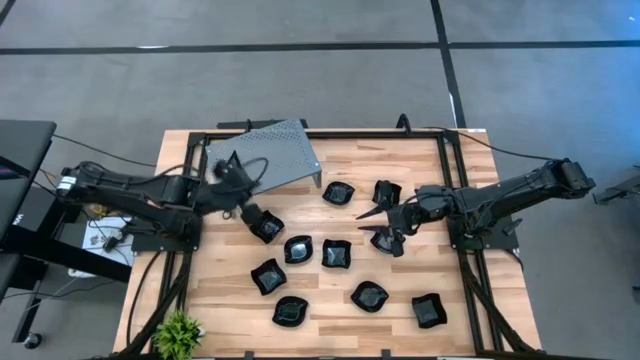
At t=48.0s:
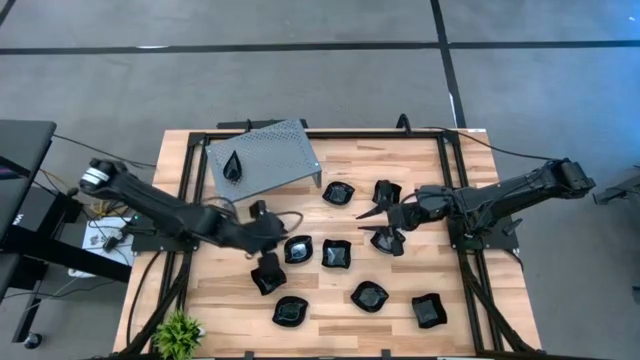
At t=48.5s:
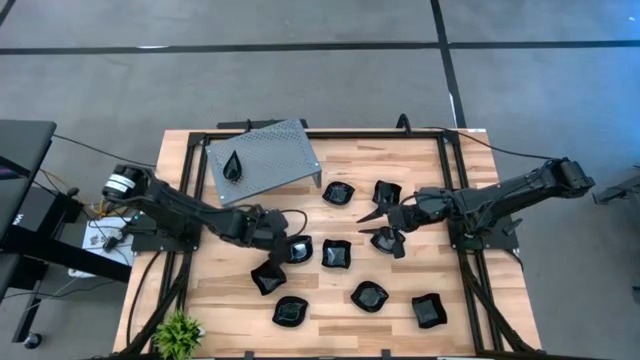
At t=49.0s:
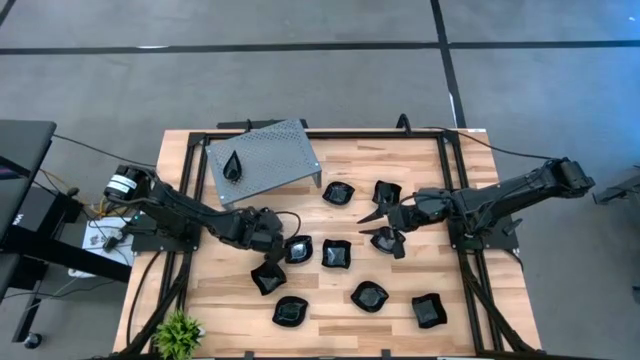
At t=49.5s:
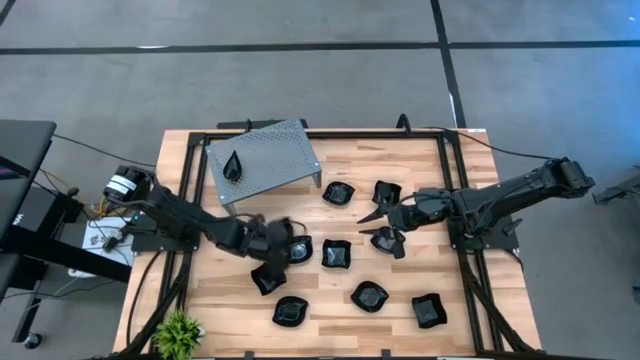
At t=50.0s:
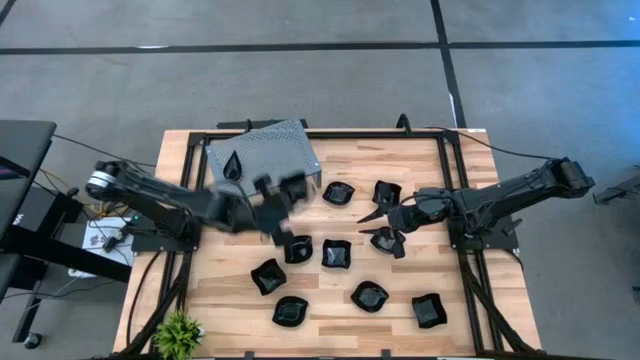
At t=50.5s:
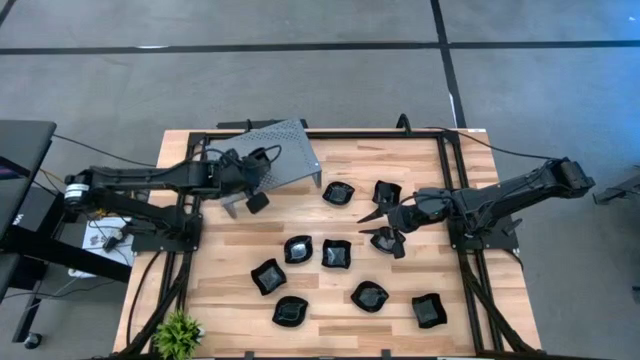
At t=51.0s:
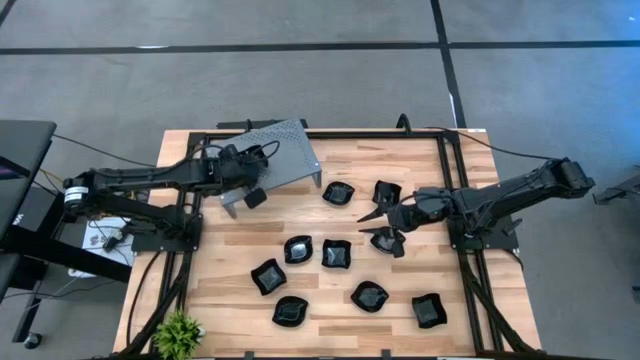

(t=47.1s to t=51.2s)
Task: Pick & Place Mini shaped plates
Put the black distorted square plate on the shelf

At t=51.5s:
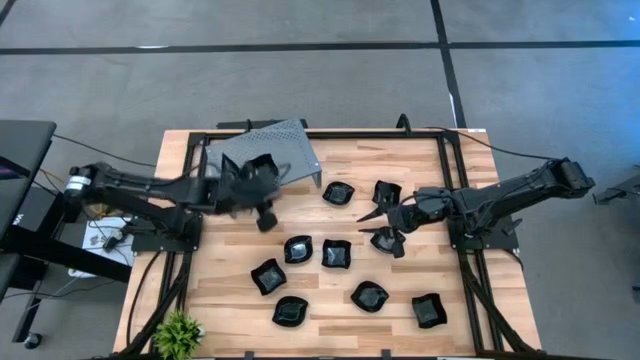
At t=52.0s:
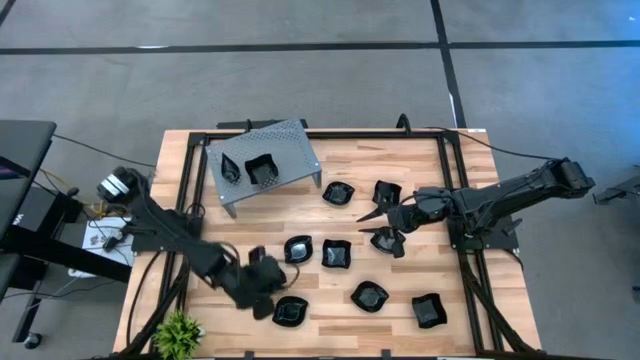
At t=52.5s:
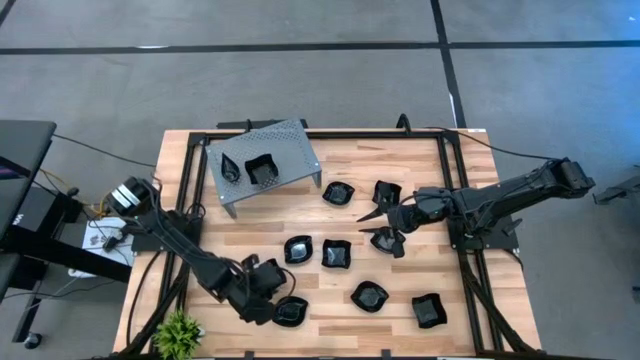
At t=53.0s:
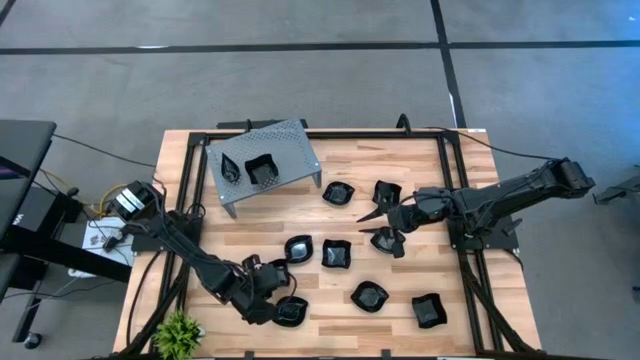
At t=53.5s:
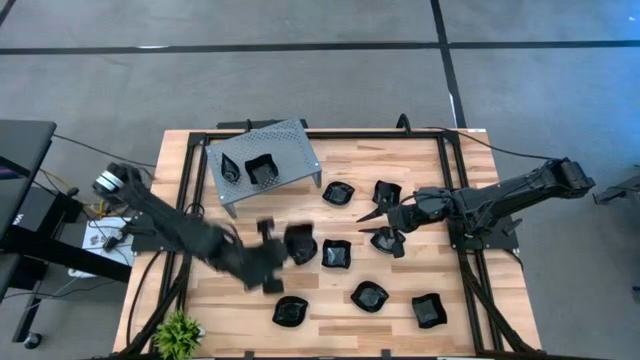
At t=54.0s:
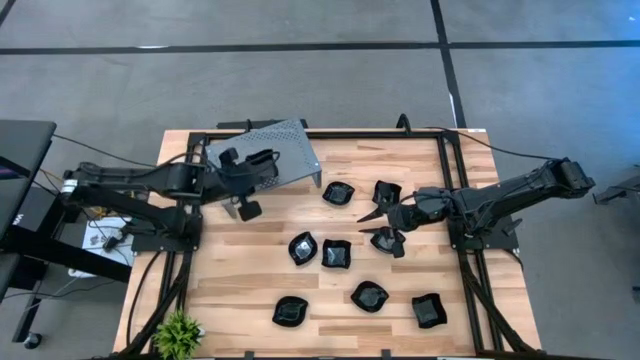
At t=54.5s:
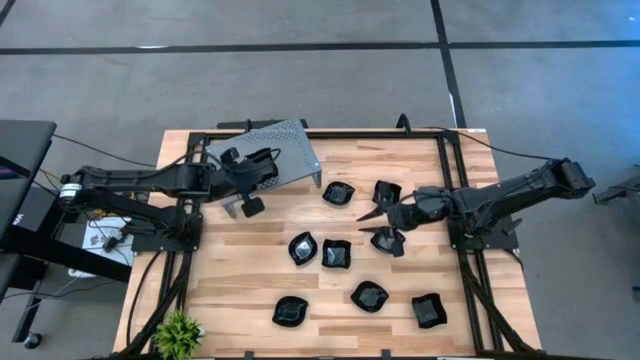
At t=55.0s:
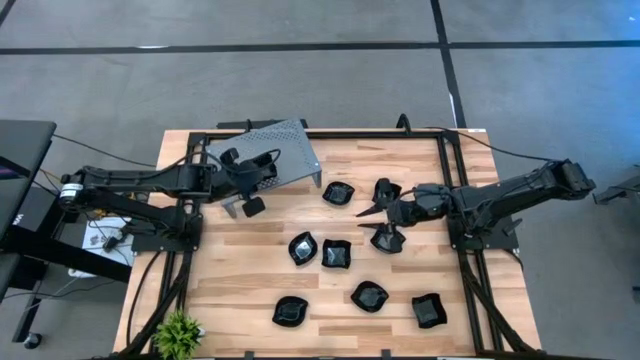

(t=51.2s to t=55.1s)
Stack the black distorted square plate on top of the black distorted square plate on the shelf

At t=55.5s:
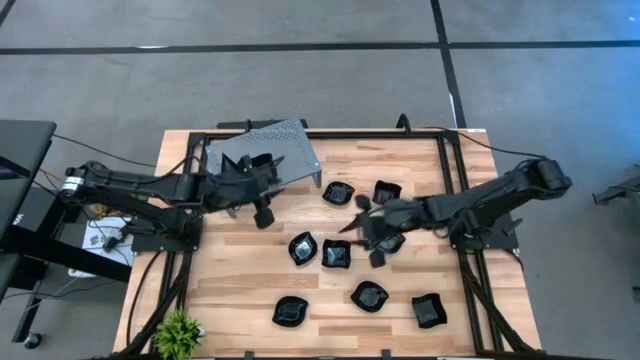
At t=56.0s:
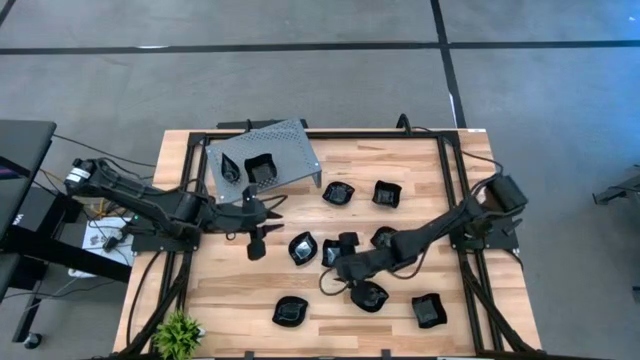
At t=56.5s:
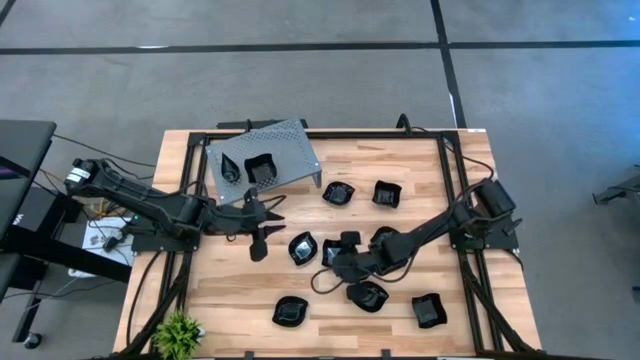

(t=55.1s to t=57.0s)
Stack the black distorted square plate on top of the black distorted square plate on the shelf

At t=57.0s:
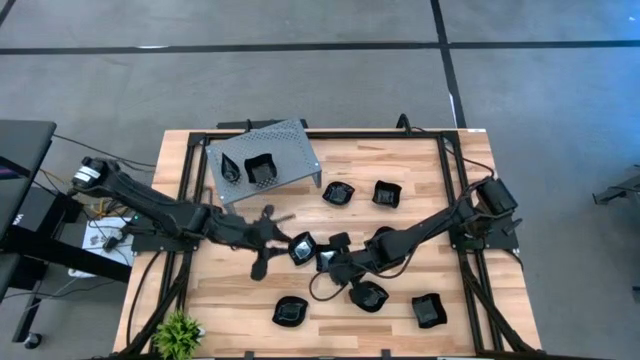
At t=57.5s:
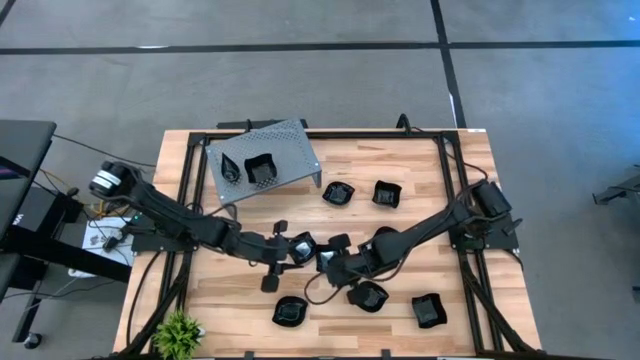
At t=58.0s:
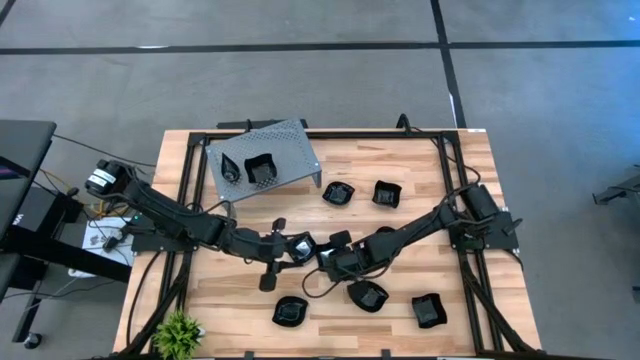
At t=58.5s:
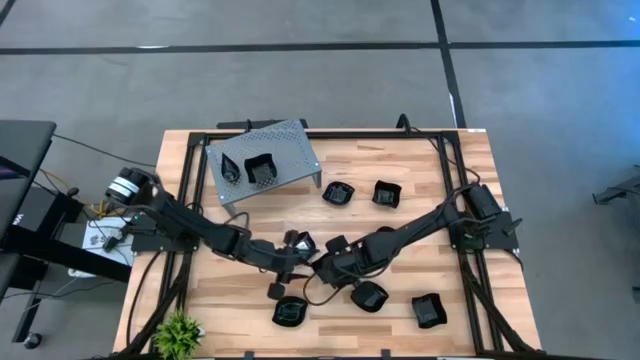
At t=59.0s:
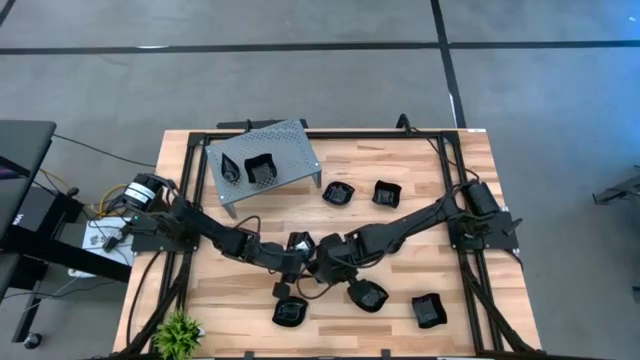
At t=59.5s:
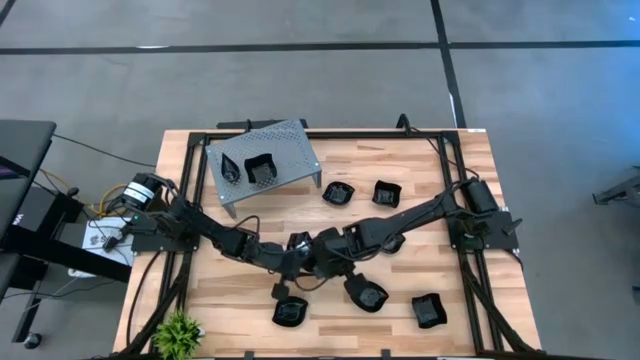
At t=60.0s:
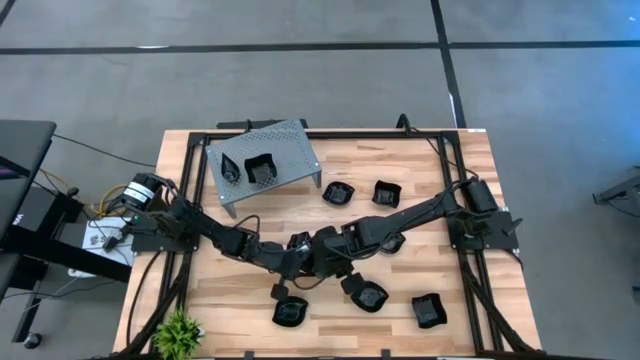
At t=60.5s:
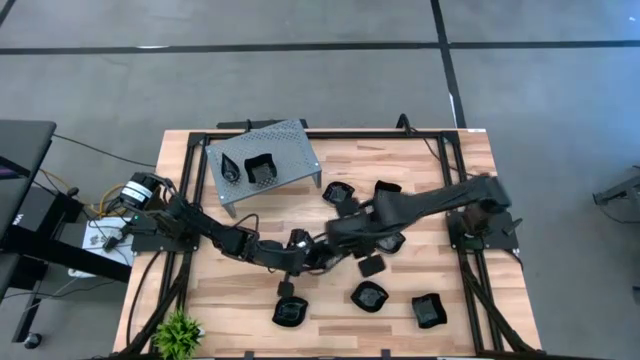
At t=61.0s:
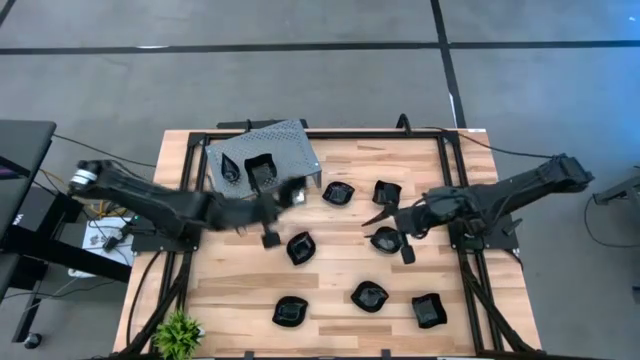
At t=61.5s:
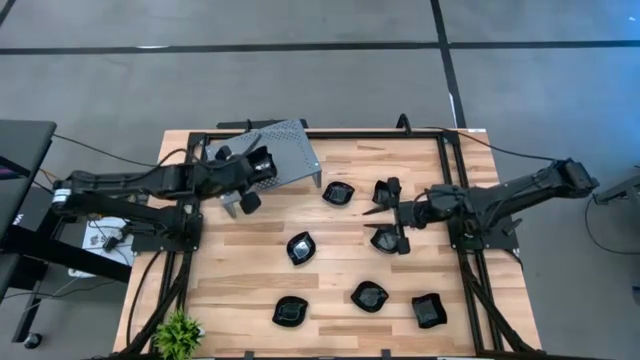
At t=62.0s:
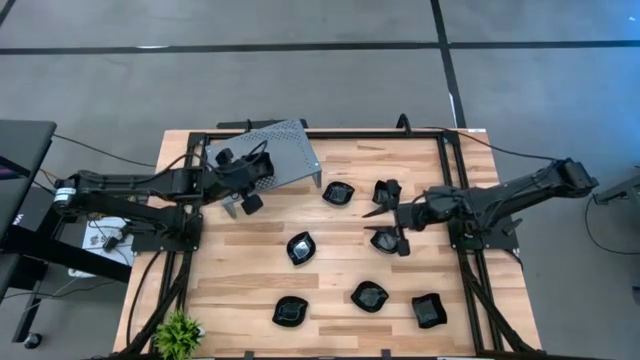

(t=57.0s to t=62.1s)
Stack the black distorted square plate on top of the black distorted square plate on the shelf

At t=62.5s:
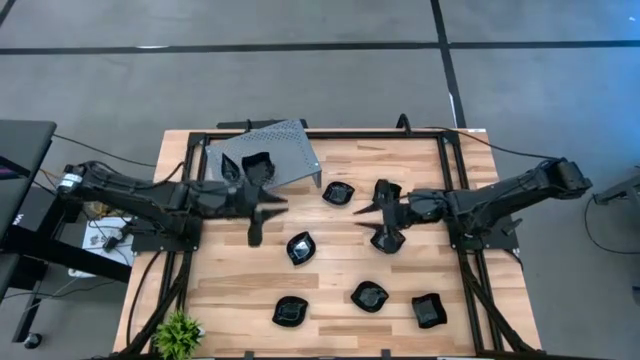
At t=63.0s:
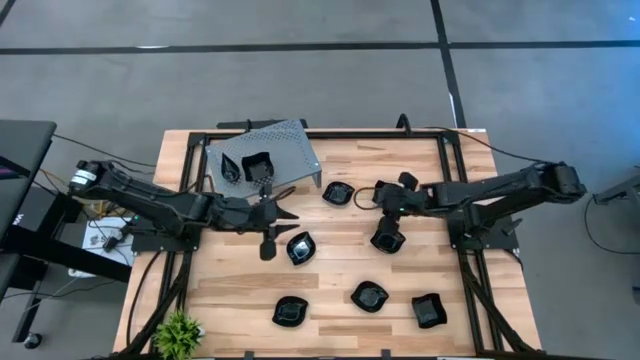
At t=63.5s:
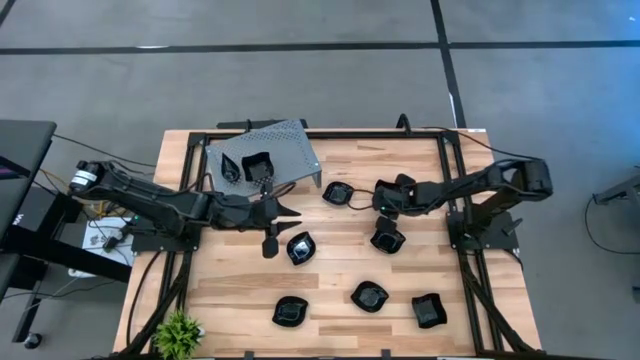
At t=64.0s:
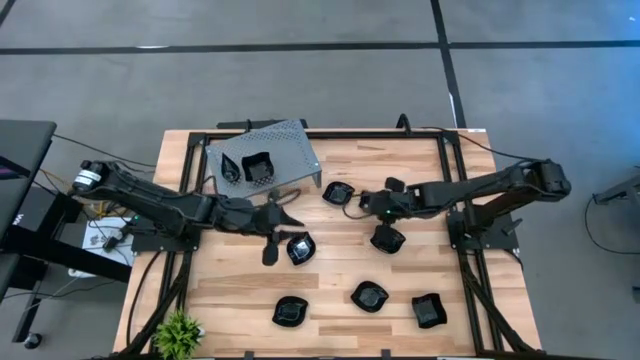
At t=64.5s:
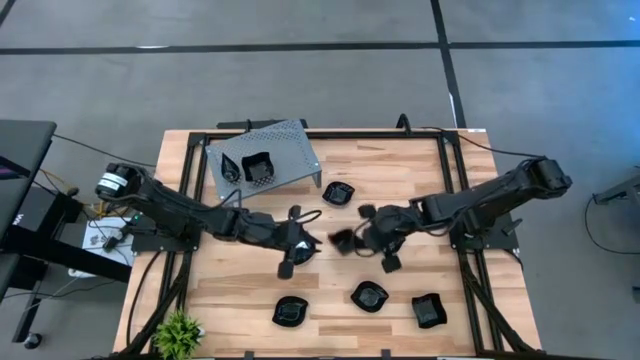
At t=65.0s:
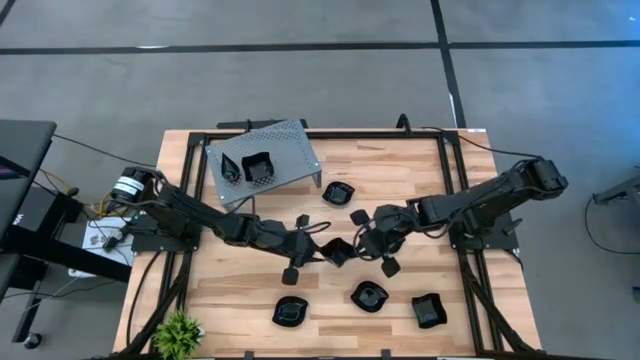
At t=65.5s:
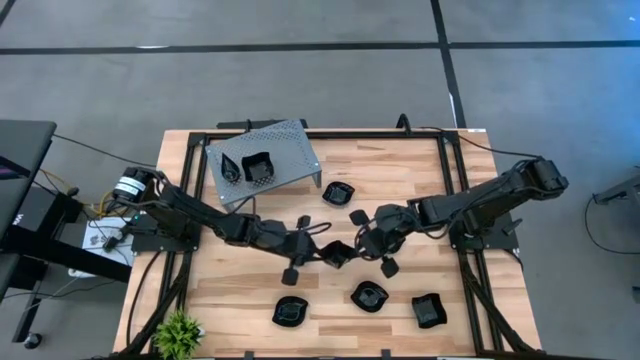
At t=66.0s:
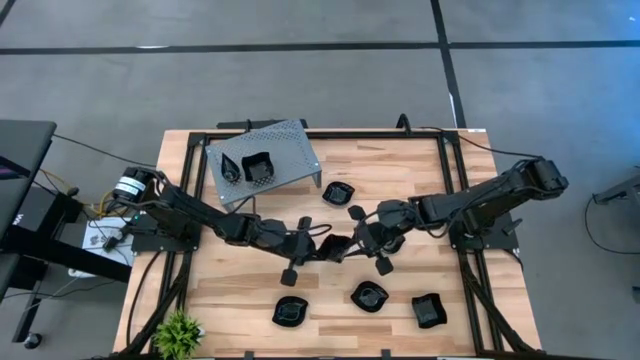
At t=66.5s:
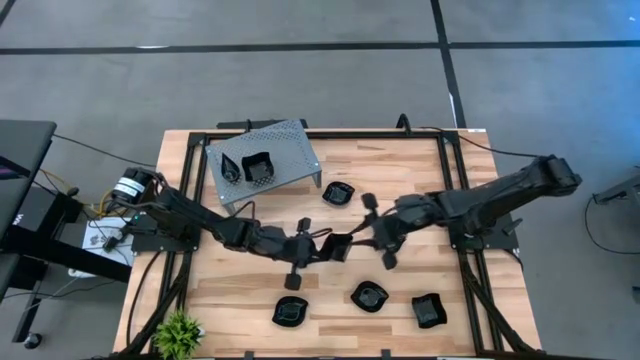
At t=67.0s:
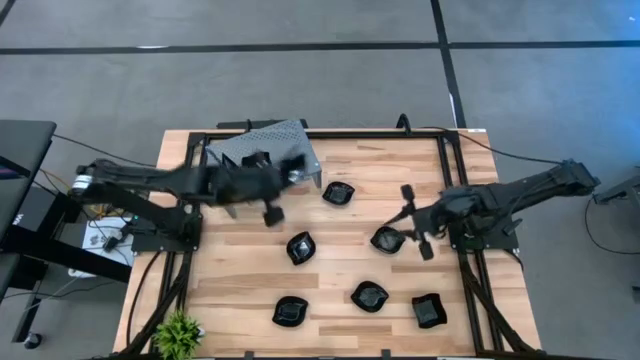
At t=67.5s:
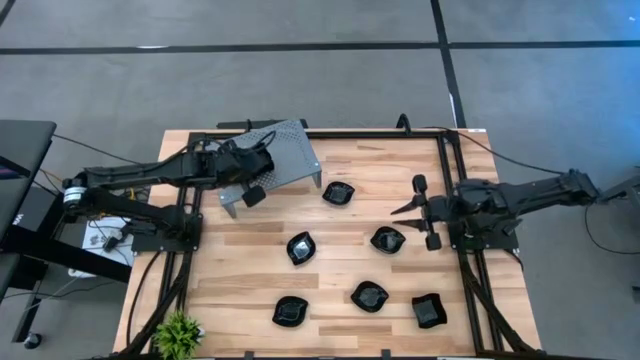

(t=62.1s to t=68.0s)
Stack the black distorted square plate on top of the black distorted square plate on the shelf

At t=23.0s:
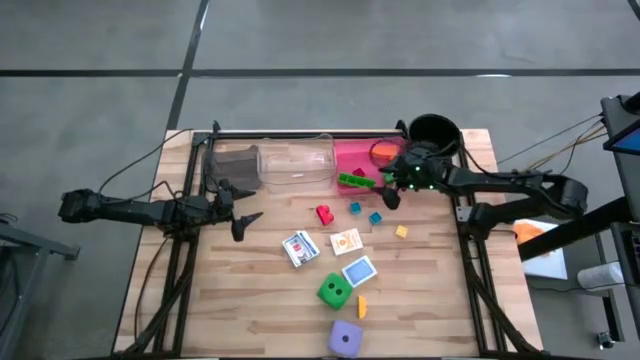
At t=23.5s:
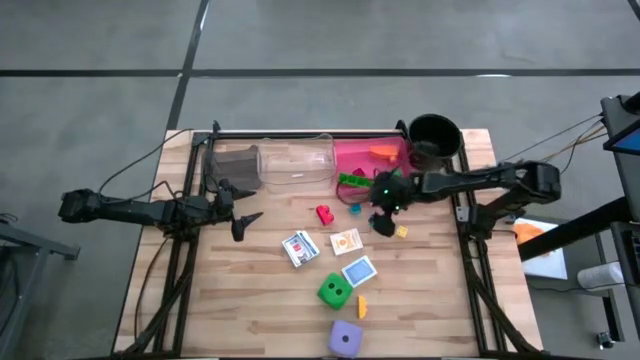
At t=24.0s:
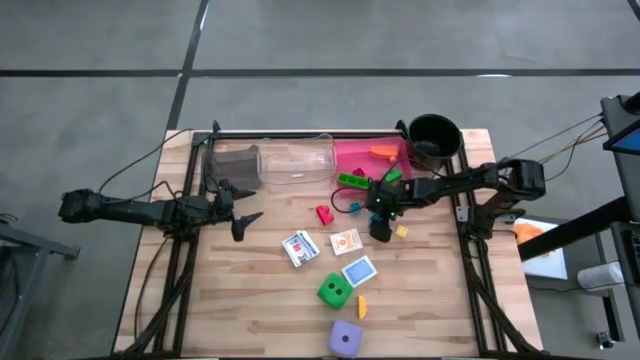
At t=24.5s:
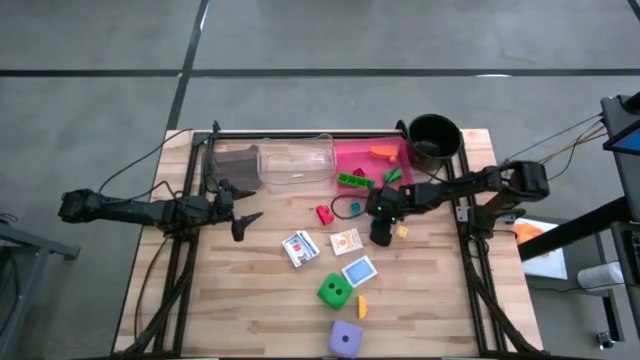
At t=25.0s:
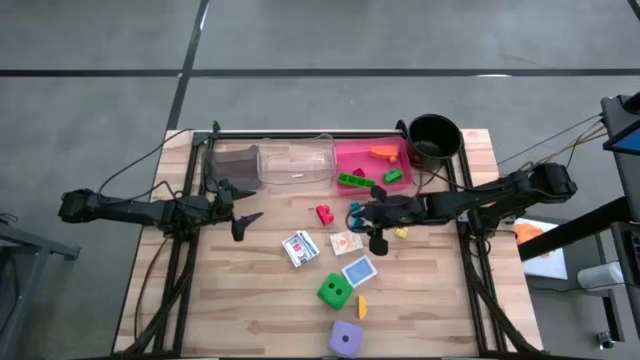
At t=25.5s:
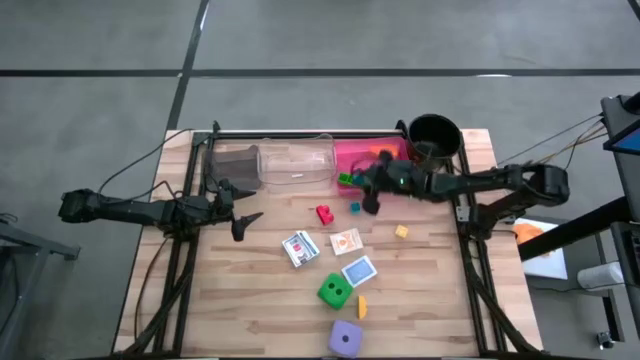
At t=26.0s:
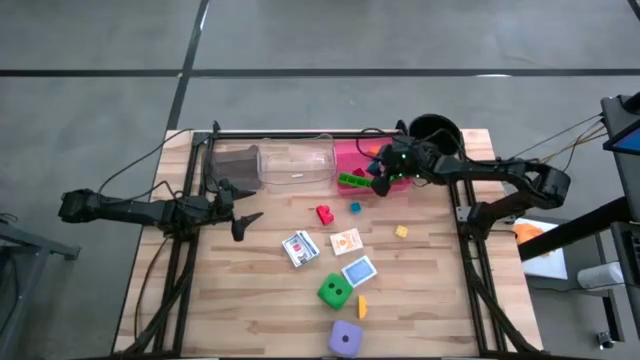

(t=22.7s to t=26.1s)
Task: Pick & Place Toys
Put the blue game piece into the pink bin
